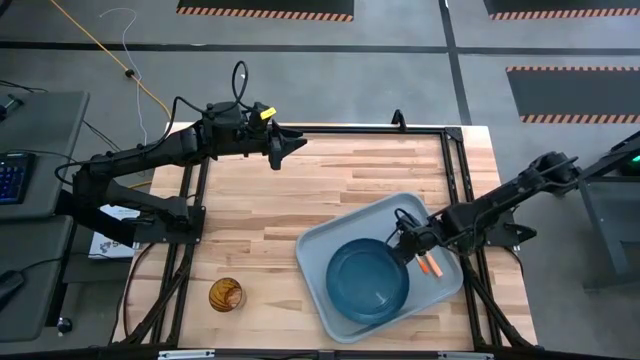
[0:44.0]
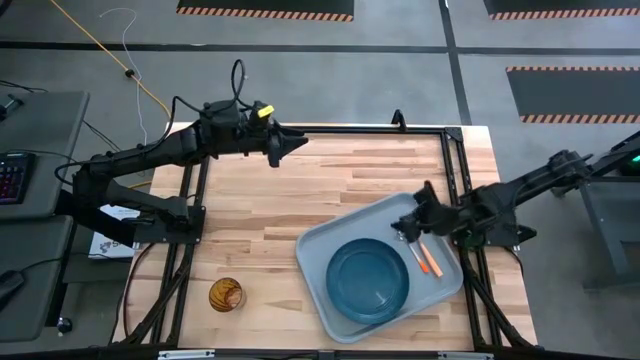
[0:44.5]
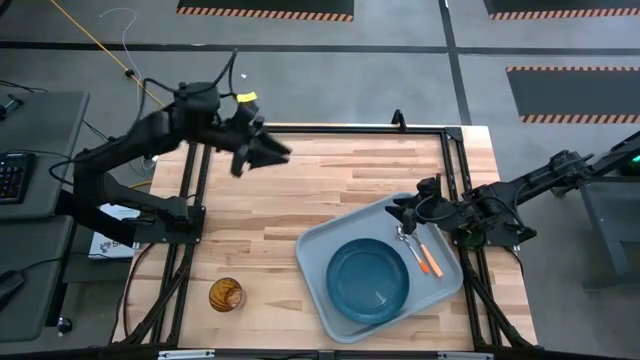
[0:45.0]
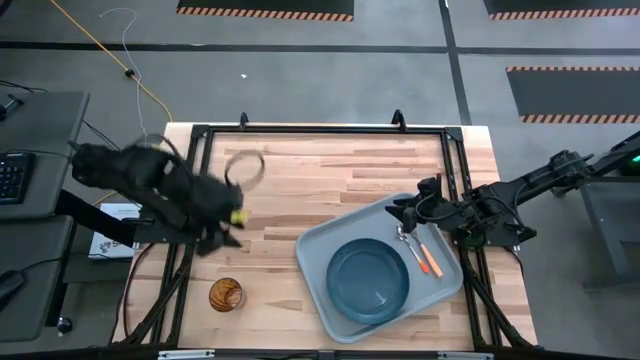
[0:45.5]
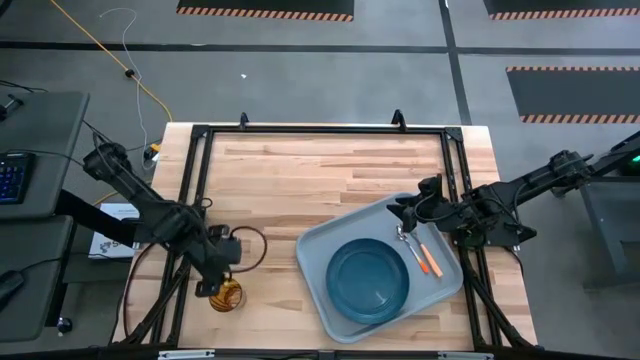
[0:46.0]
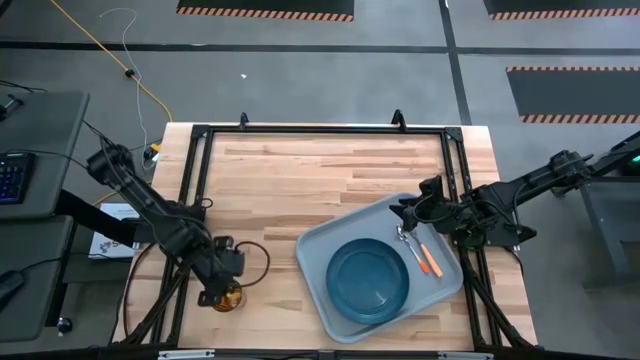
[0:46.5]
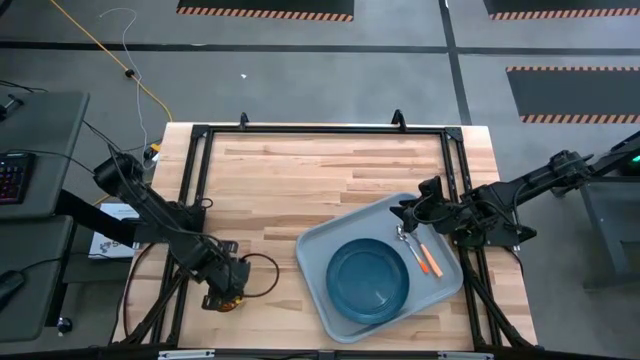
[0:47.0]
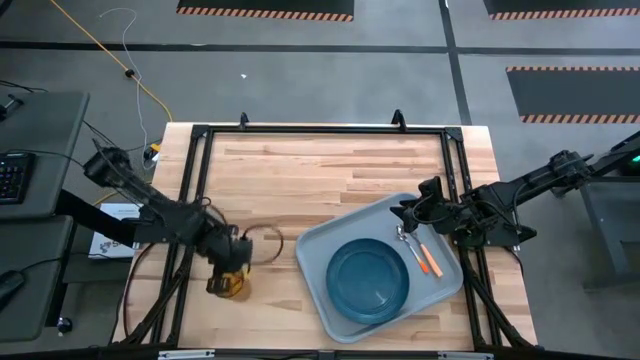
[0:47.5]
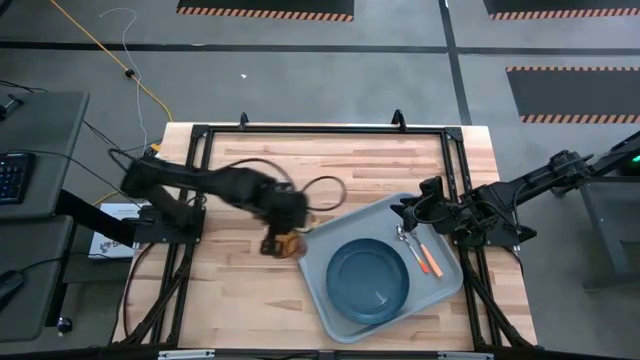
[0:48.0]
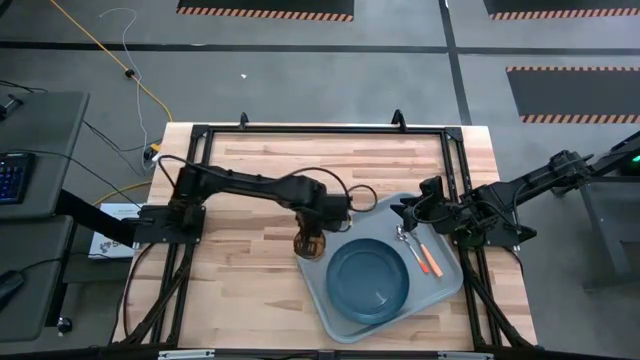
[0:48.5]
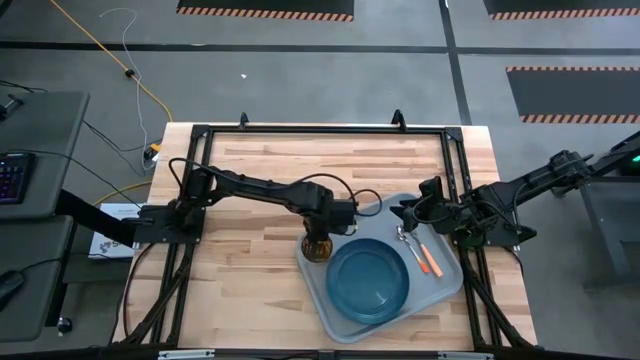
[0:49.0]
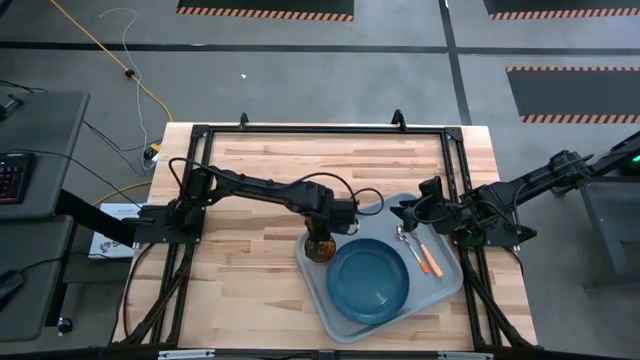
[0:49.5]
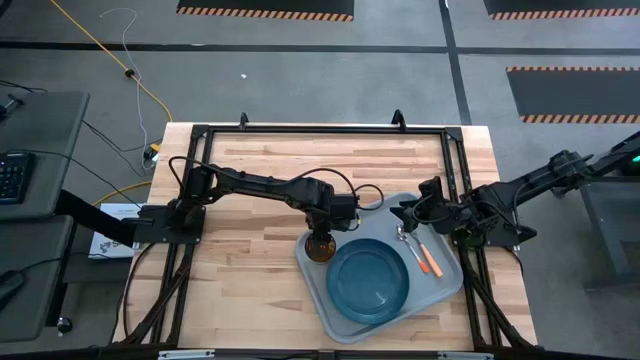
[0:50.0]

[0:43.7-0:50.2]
Task: Pick and place plate/cup/fork/spoon on tray
Put the yellow cup on the top left of the gray tray

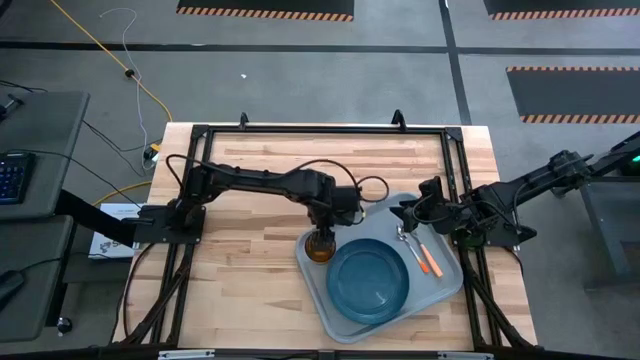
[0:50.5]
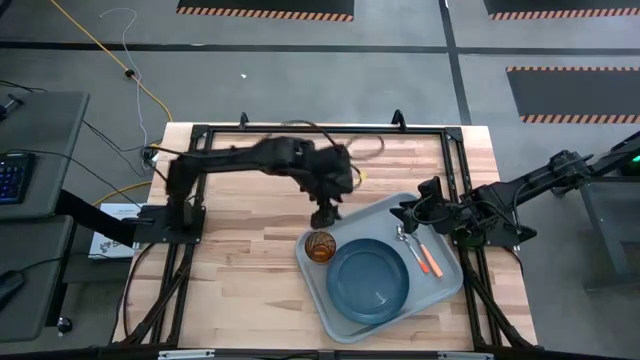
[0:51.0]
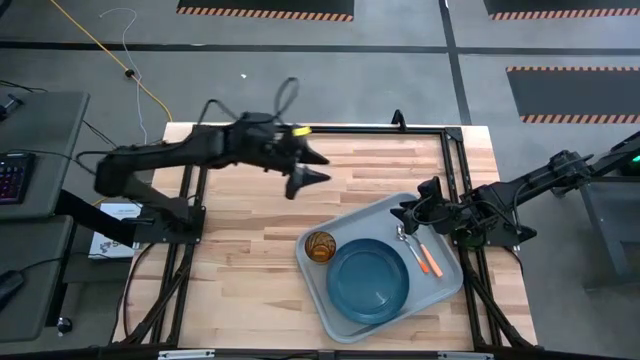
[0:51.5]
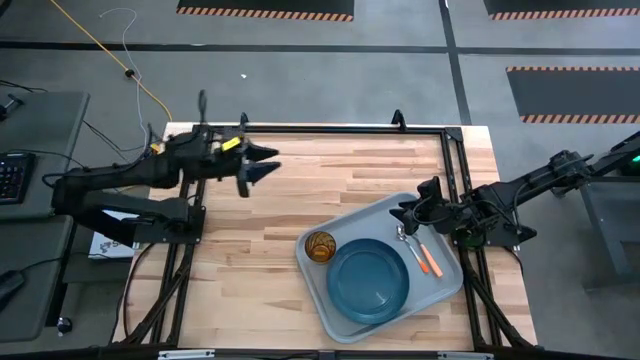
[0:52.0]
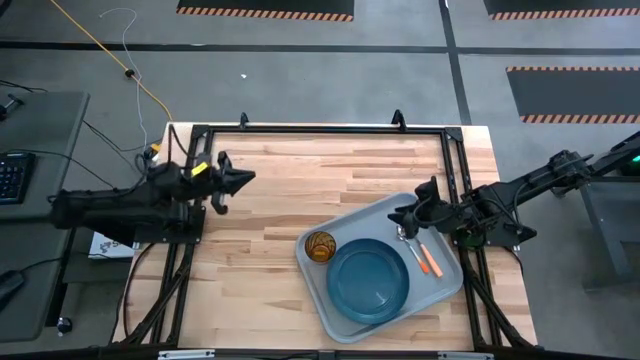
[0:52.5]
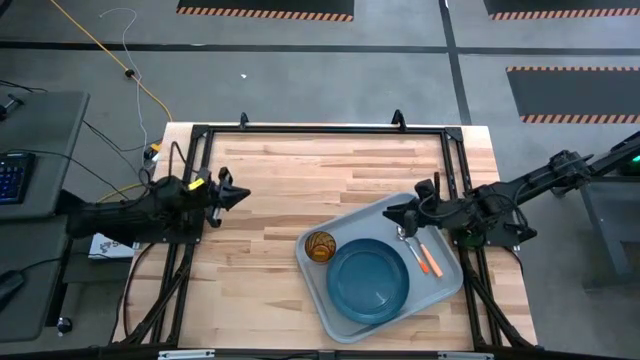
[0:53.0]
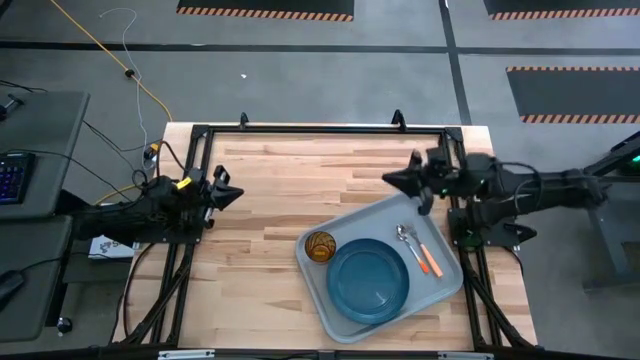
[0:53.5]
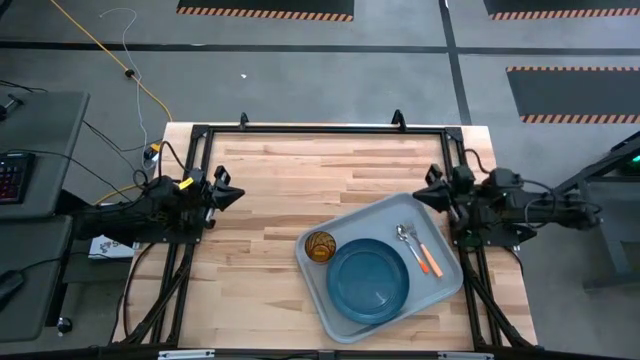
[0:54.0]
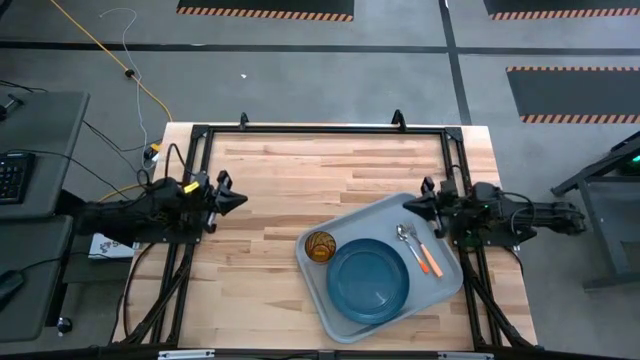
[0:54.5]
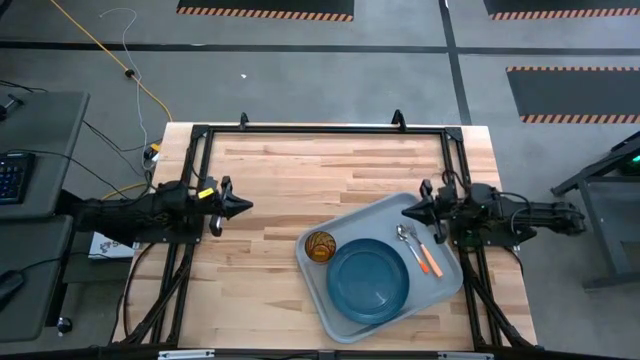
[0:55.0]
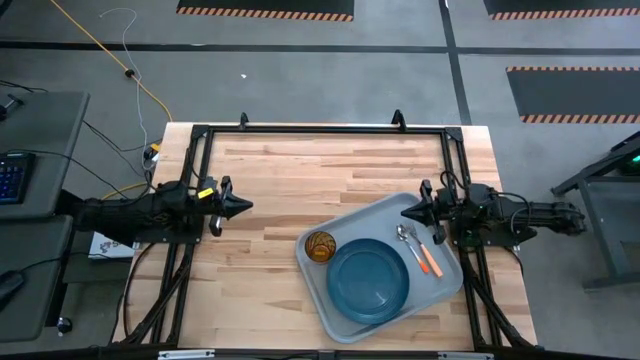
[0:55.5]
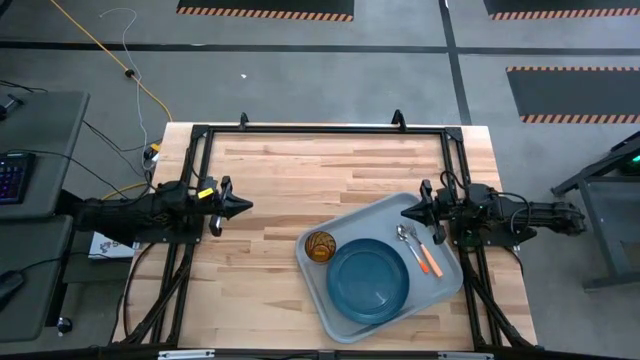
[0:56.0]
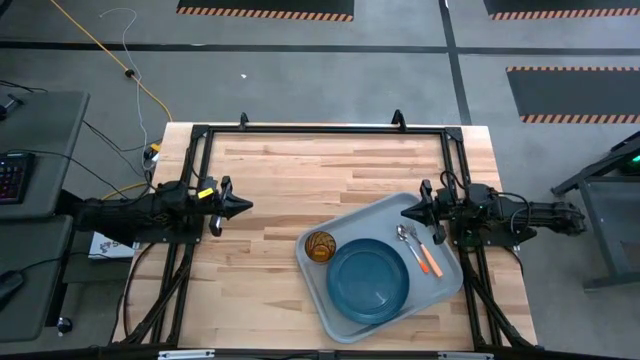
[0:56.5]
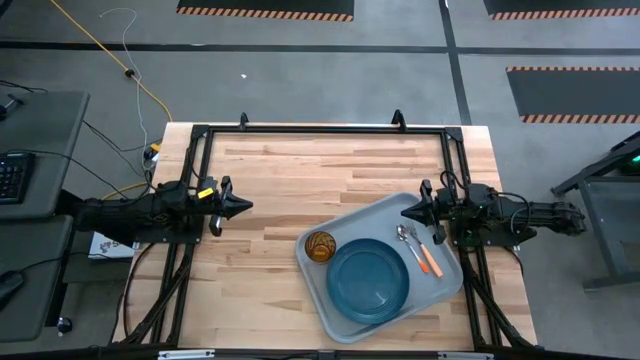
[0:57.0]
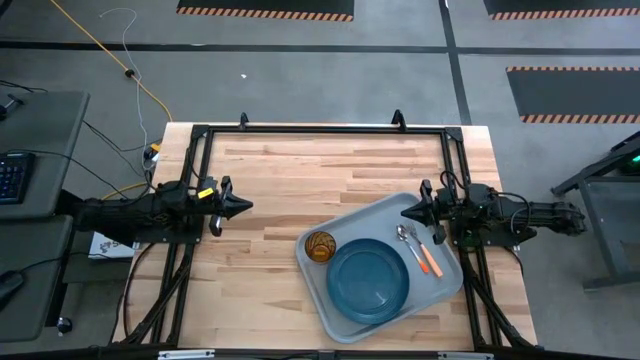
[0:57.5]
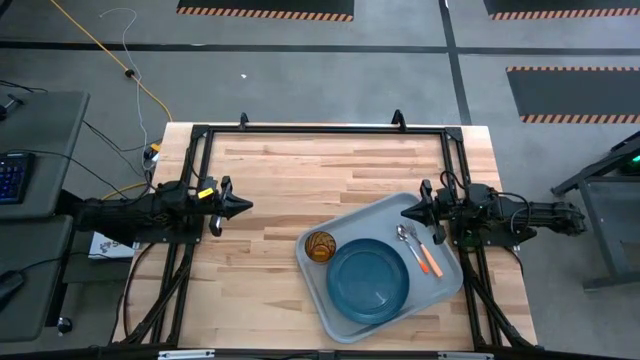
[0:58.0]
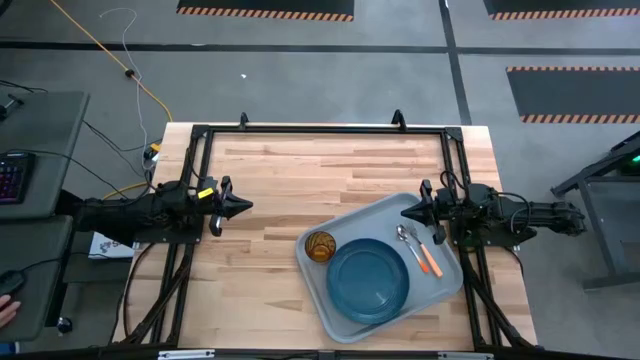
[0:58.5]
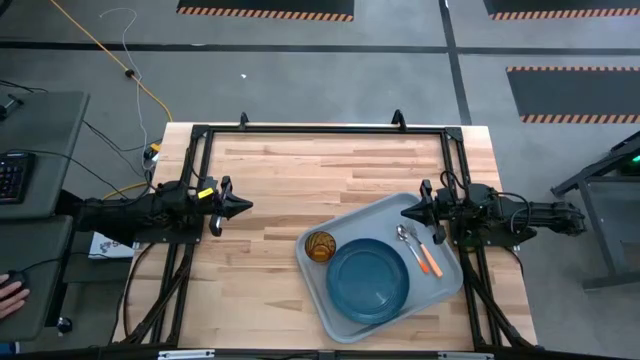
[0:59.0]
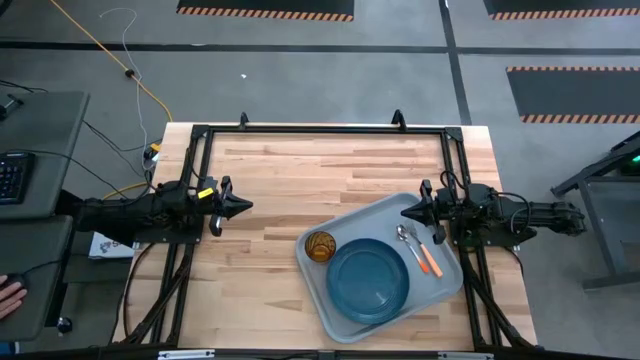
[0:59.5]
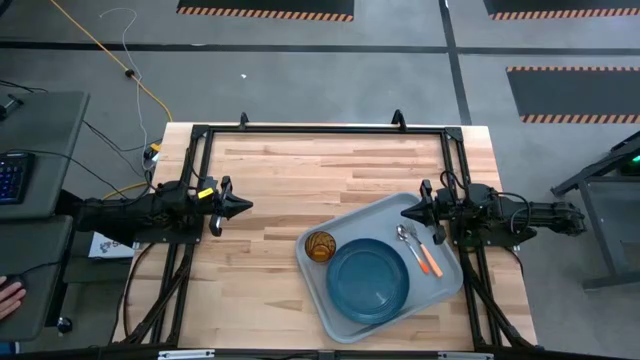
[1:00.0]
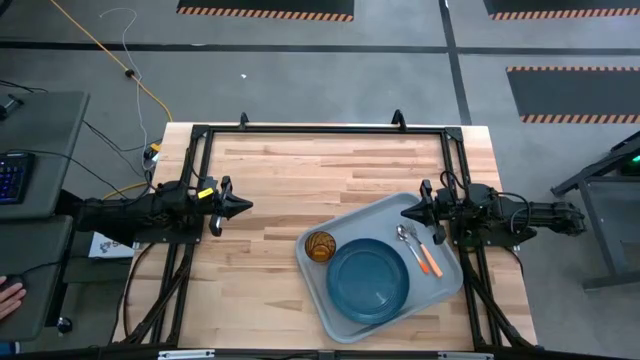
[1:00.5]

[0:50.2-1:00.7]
Return to Home Position
